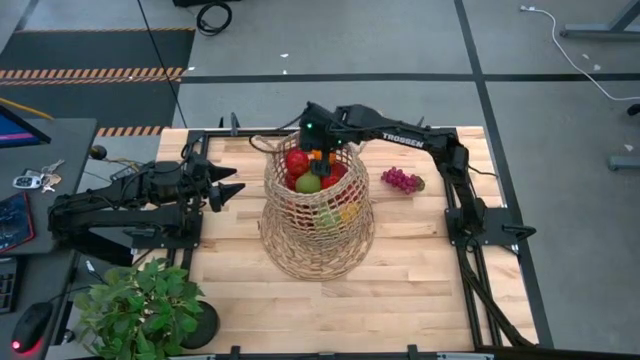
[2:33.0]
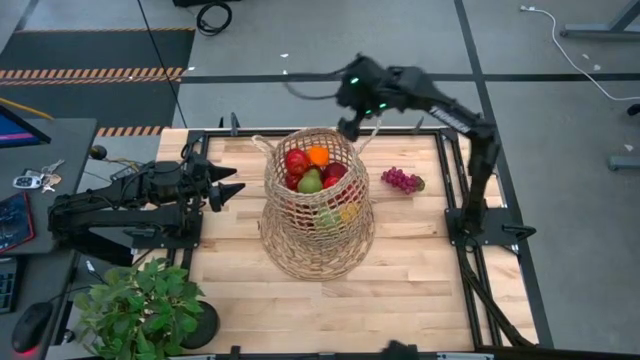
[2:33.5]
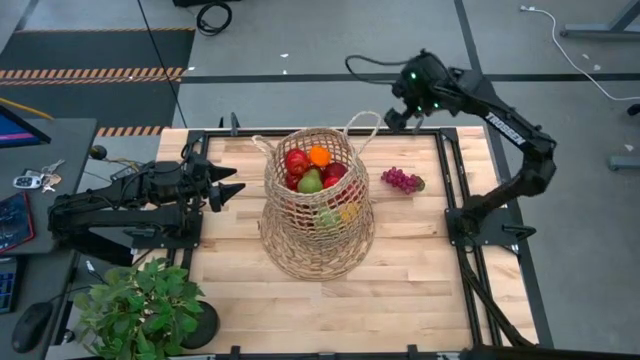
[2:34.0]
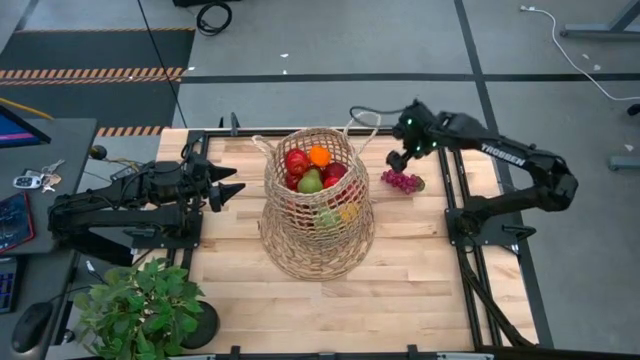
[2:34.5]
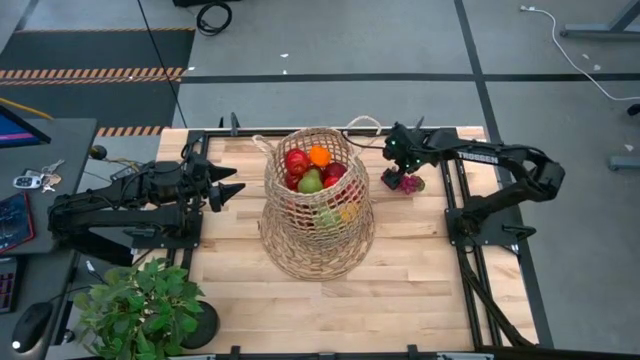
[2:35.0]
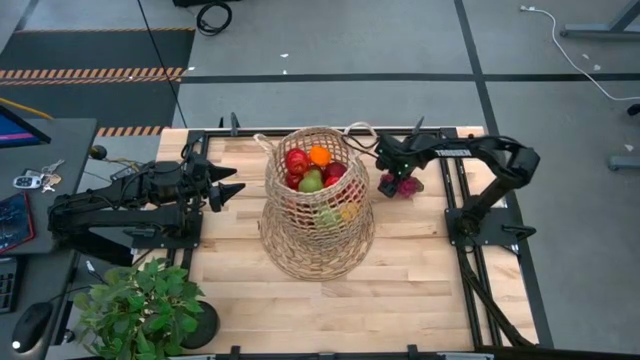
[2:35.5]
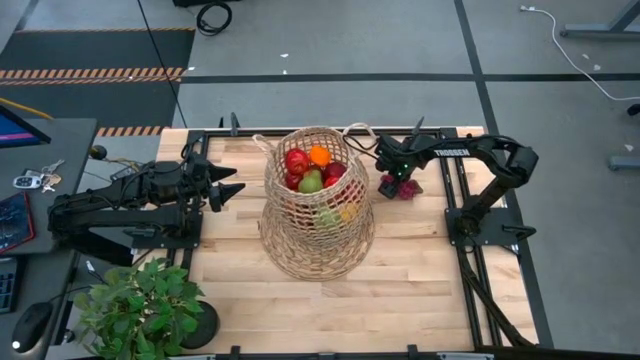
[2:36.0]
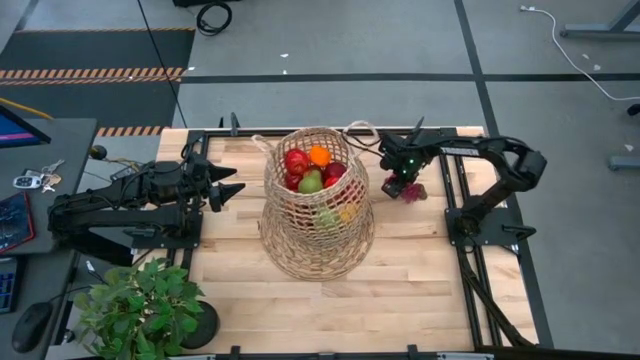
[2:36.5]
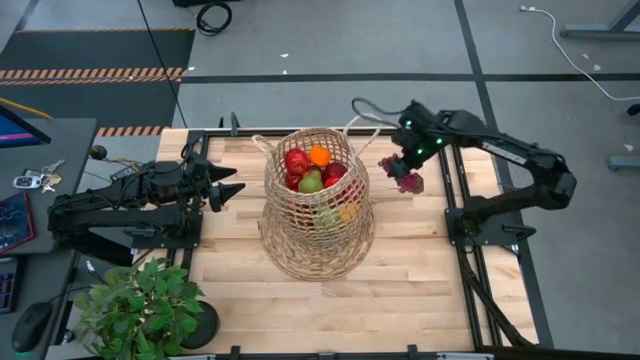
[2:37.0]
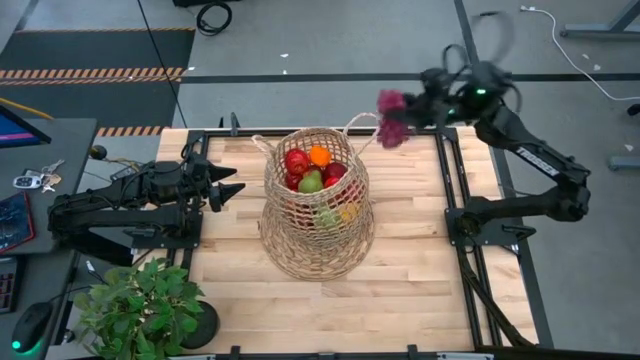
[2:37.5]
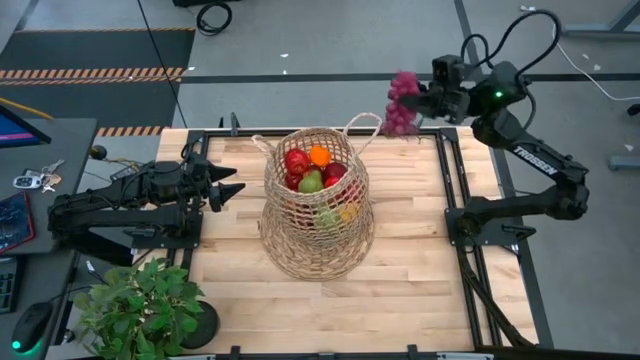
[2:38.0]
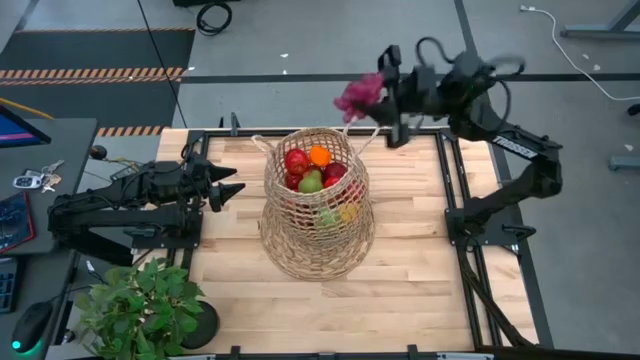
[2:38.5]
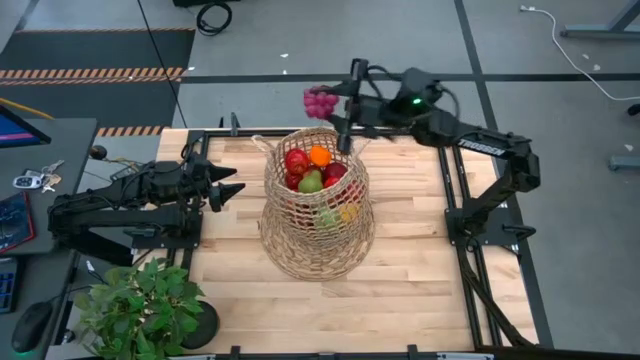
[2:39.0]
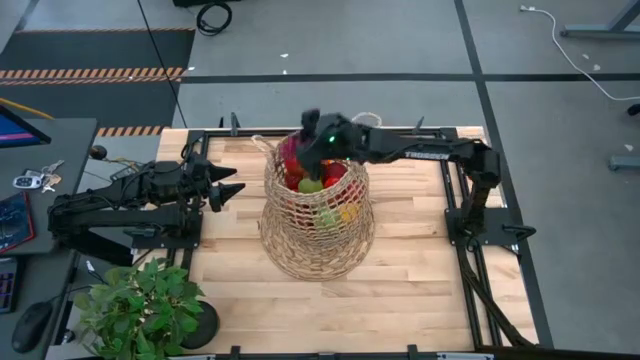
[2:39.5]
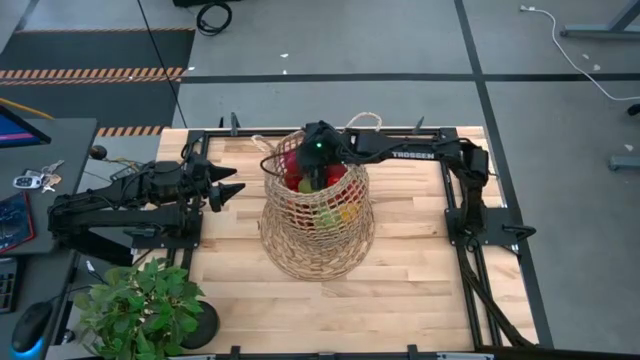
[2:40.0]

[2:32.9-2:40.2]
Task: Build produce basket
Put the grapes into the brown basket

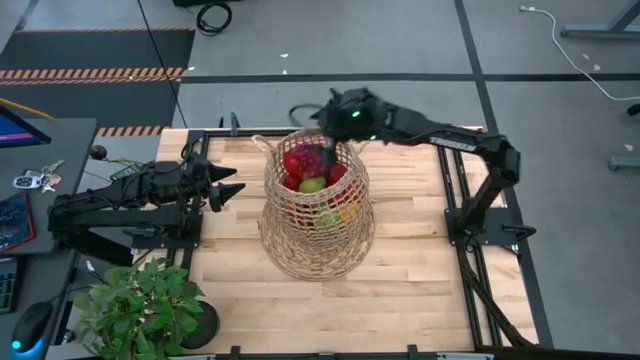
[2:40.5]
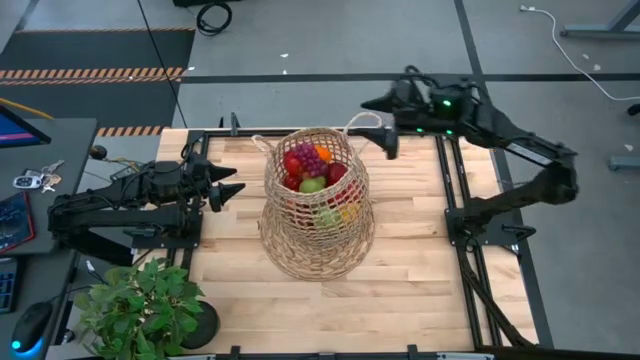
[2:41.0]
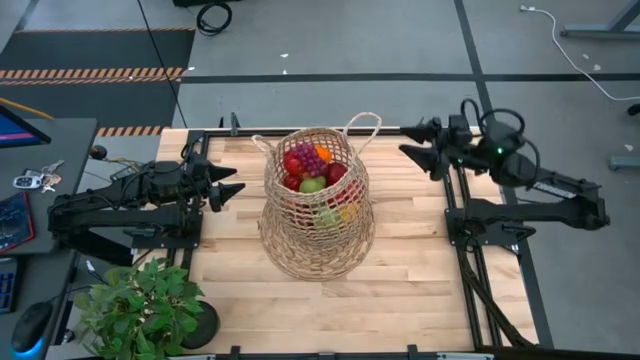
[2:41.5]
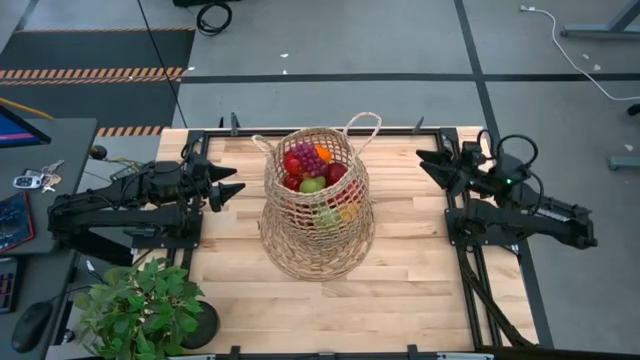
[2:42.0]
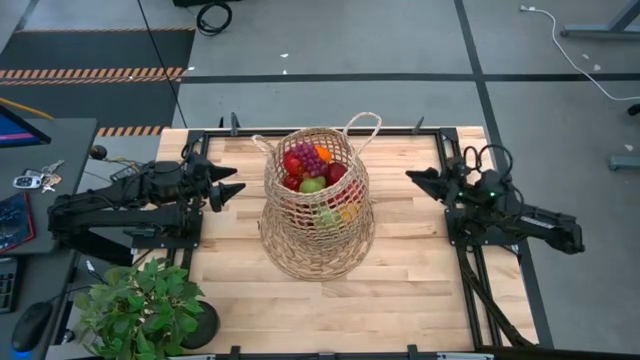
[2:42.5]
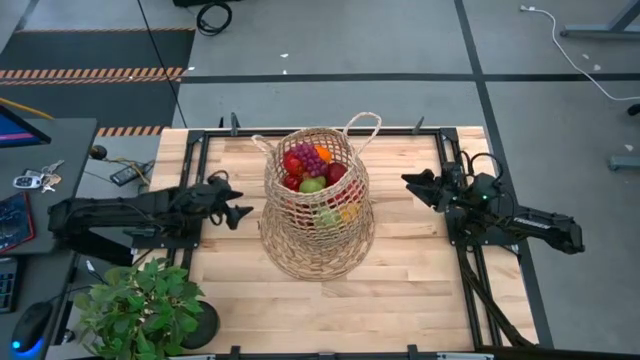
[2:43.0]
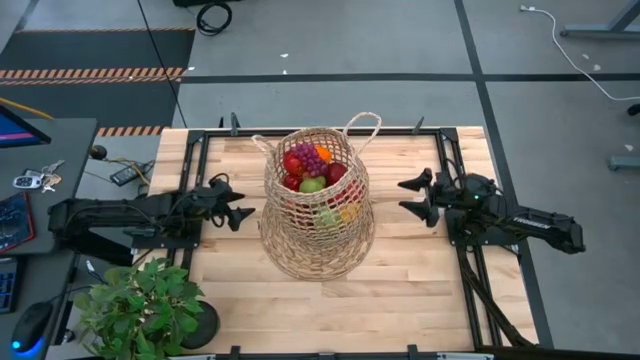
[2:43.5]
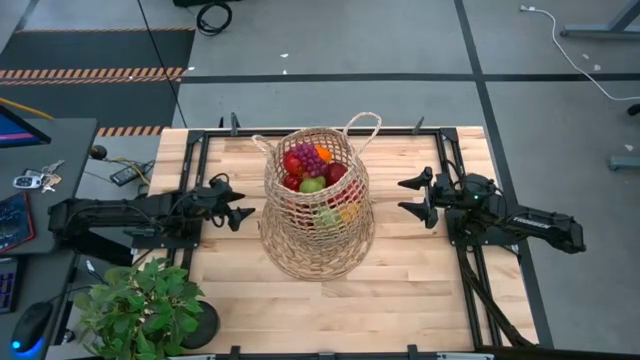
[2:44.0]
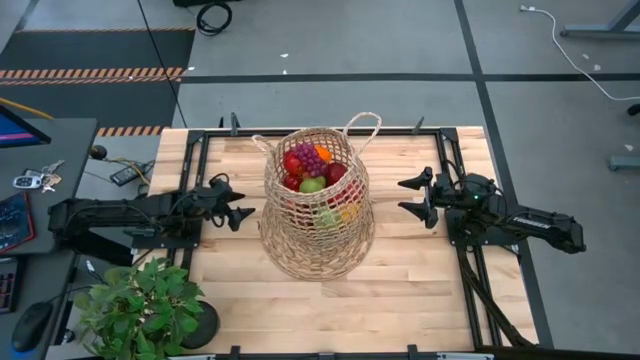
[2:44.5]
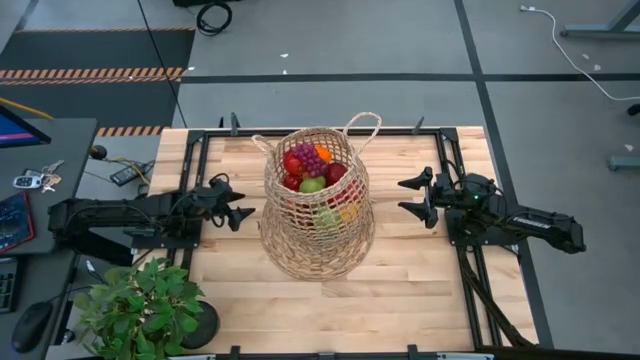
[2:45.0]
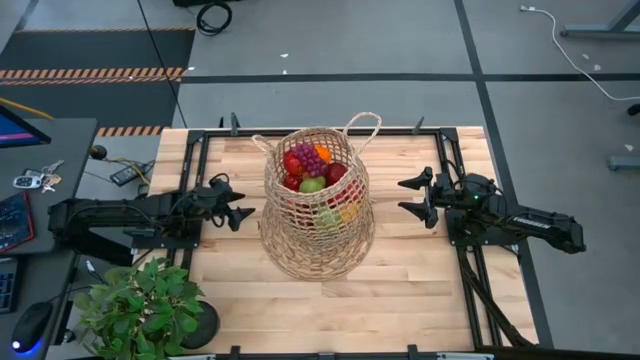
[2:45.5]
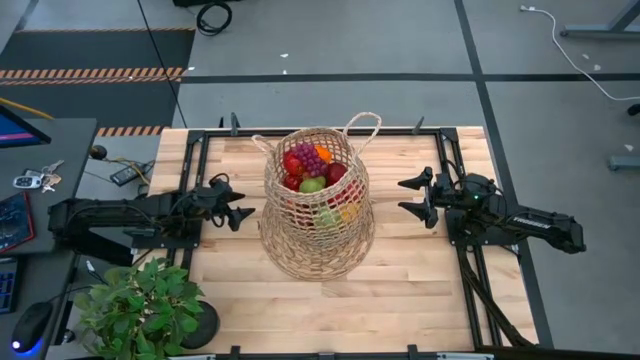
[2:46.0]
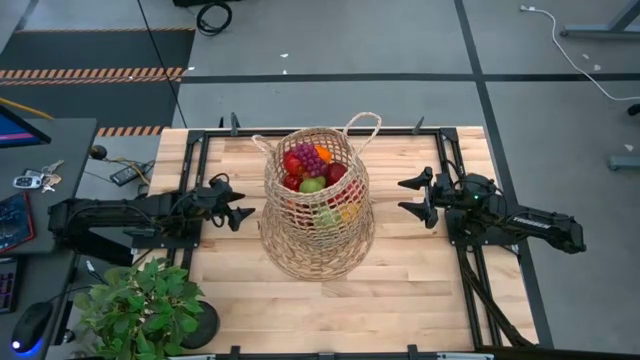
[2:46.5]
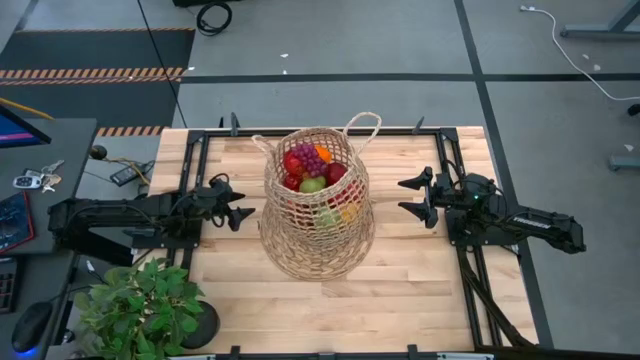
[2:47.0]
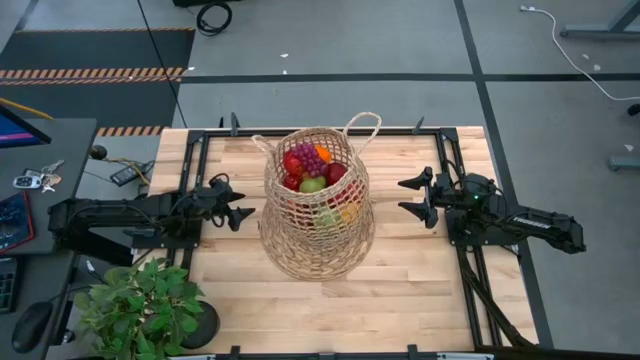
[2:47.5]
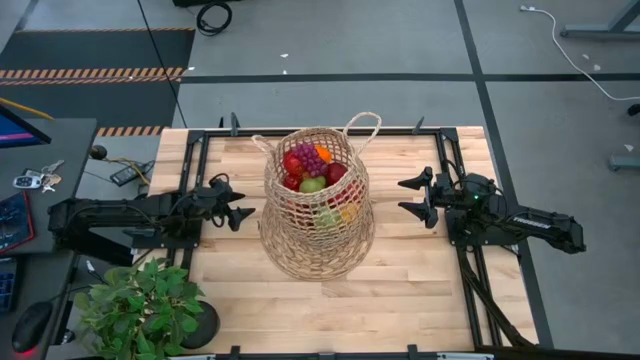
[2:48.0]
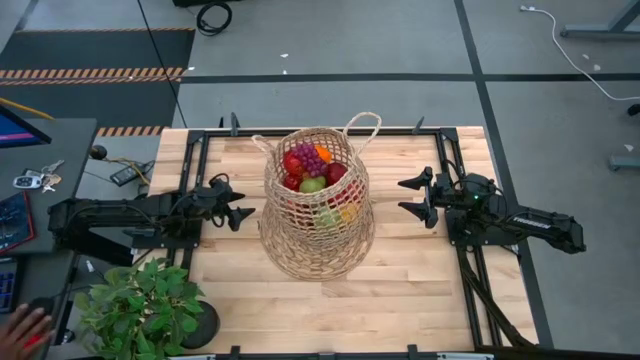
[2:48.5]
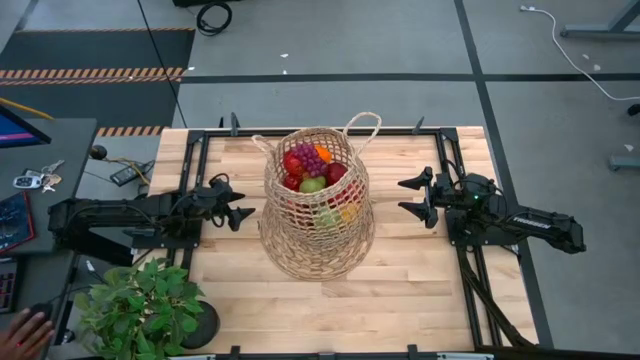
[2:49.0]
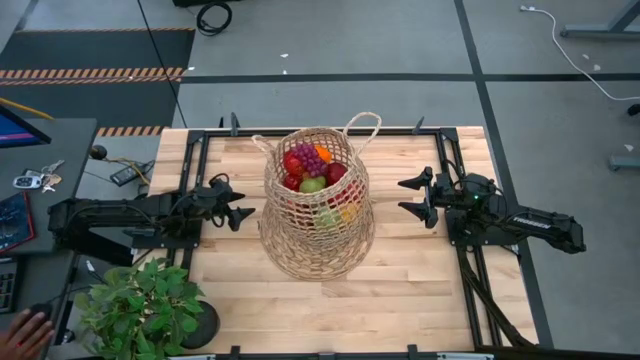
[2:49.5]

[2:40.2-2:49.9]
Return to Home Position

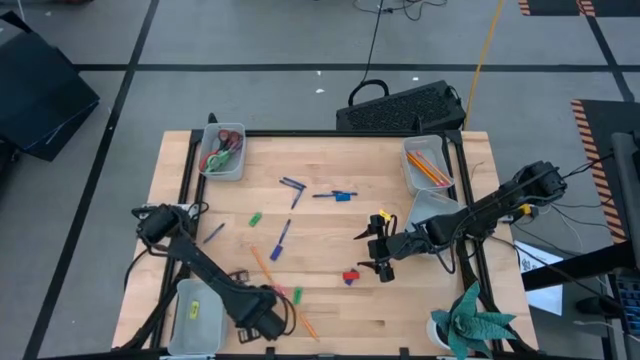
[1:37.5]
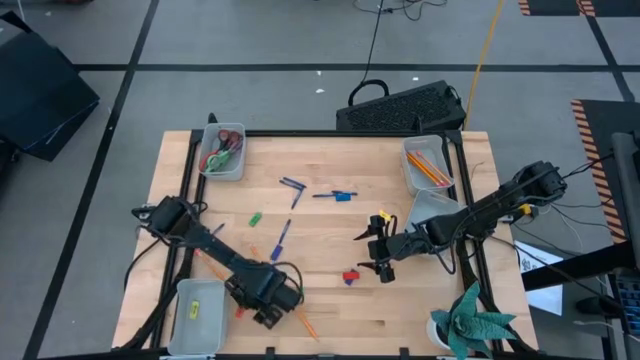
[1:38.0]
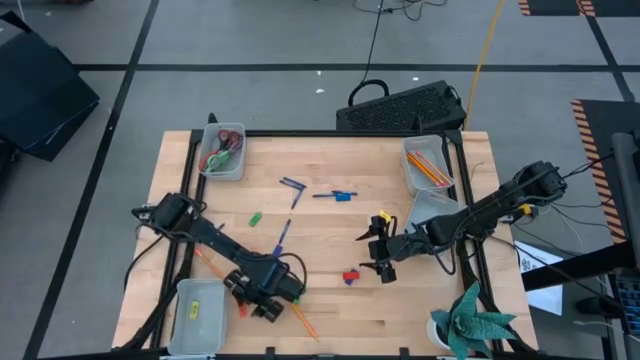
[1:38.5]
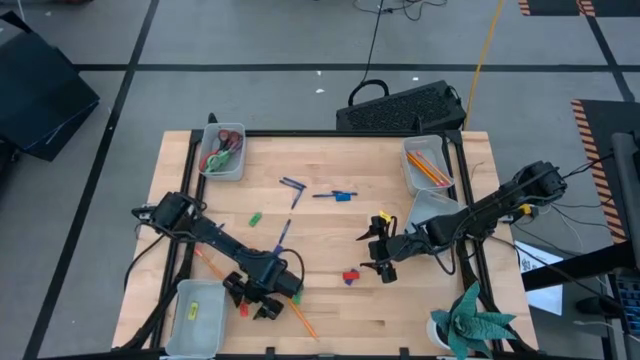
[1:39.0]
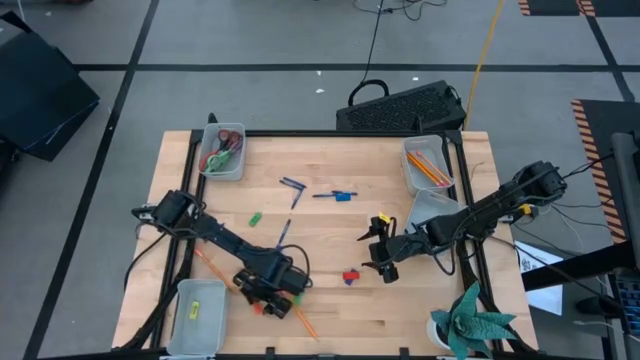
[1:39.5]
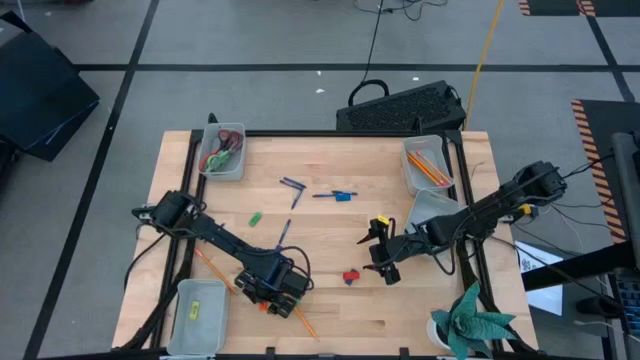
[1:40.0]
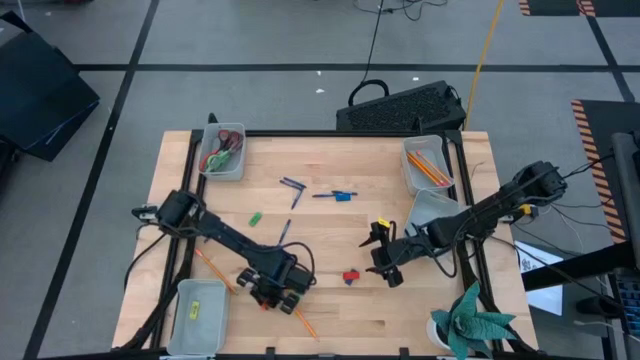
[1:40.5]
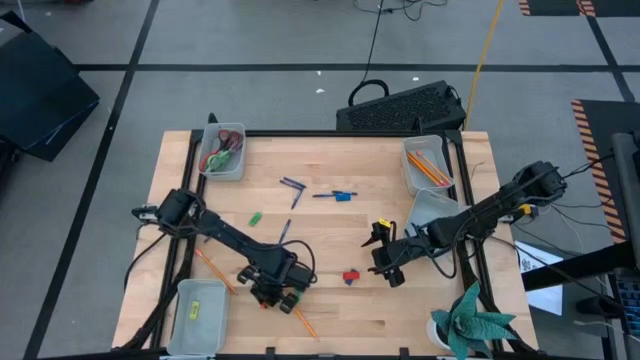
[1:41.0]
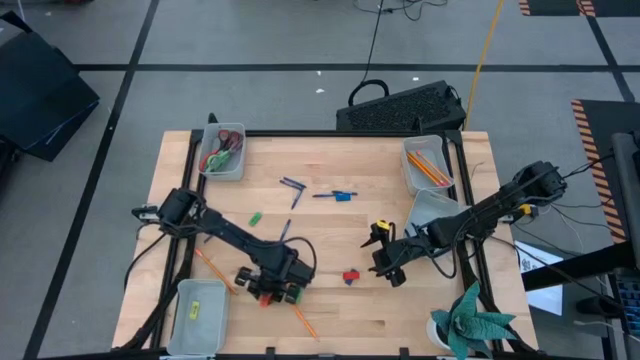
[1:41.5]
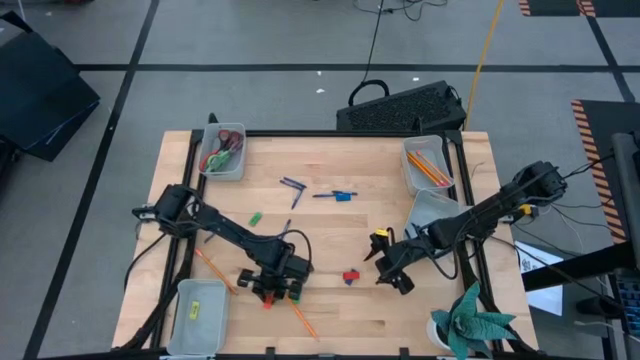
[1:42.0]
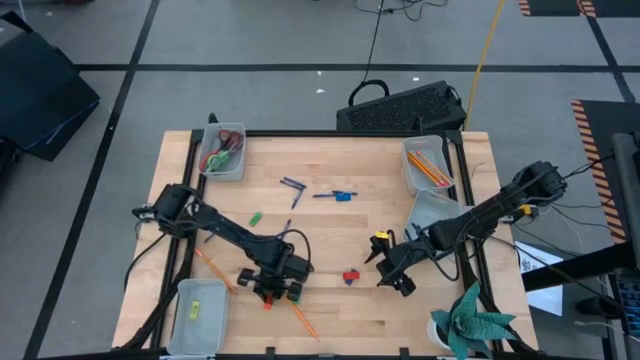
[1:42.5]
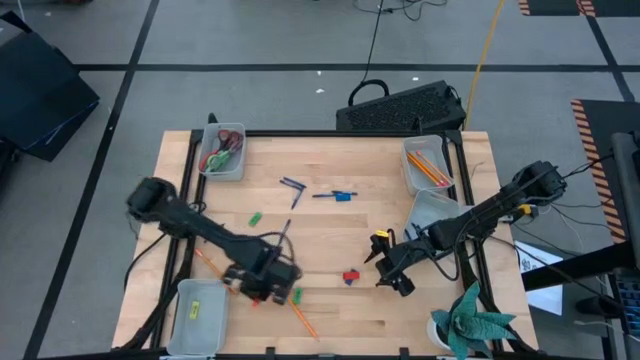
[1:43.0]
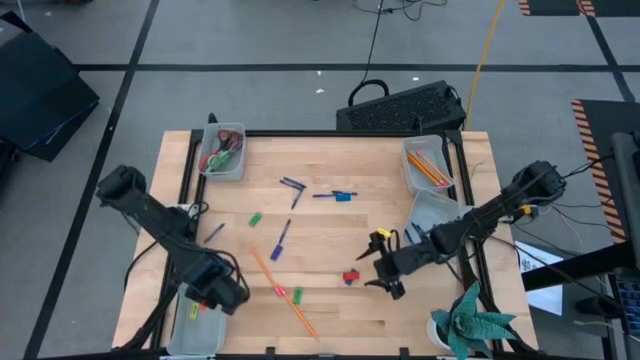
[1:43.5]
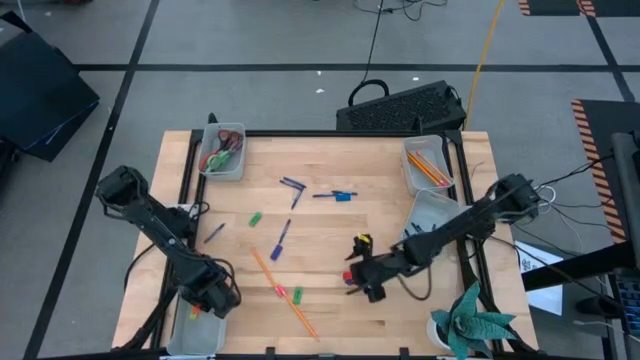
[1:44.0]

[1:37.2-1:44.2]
Task: Sort crayons/erasers/pens/pencils in bins
Put the orange eraser into the bottom left gray bin
